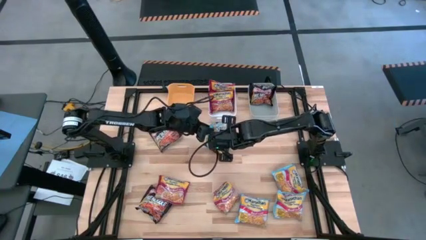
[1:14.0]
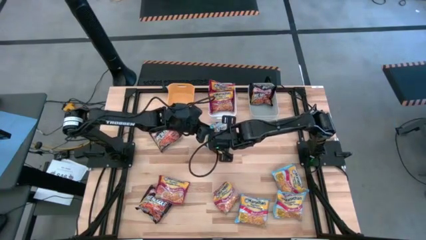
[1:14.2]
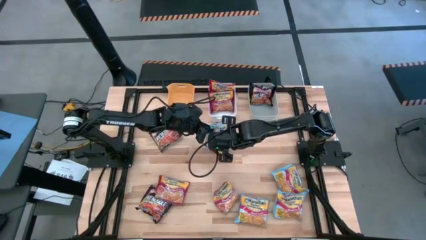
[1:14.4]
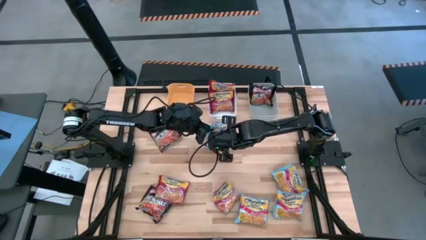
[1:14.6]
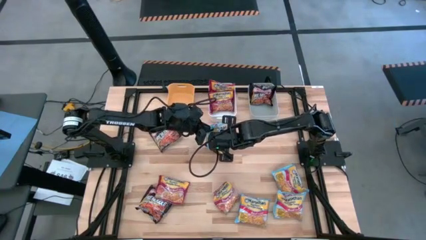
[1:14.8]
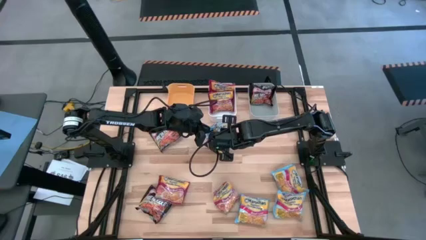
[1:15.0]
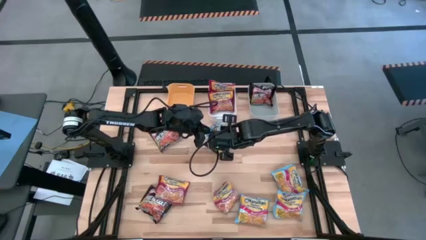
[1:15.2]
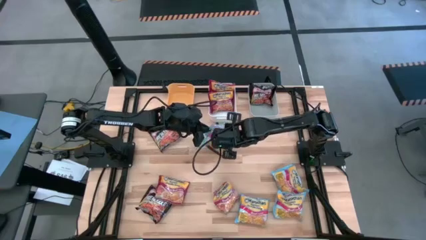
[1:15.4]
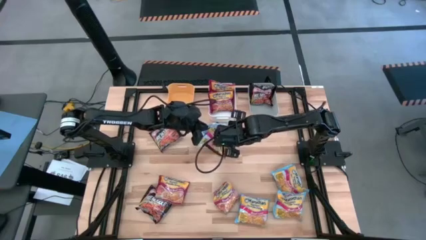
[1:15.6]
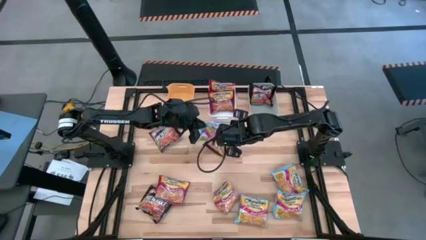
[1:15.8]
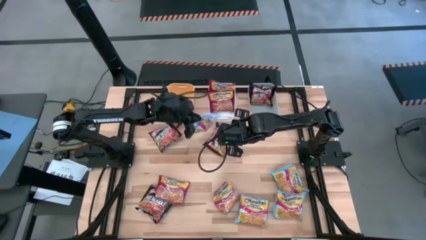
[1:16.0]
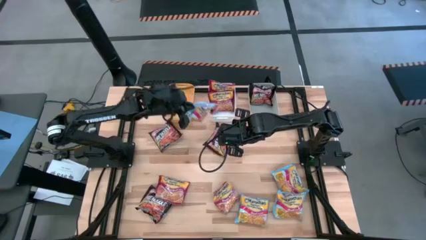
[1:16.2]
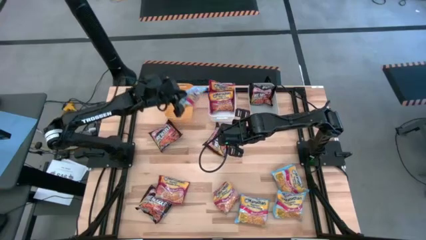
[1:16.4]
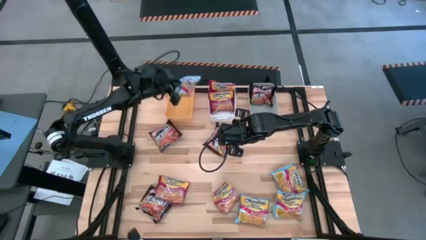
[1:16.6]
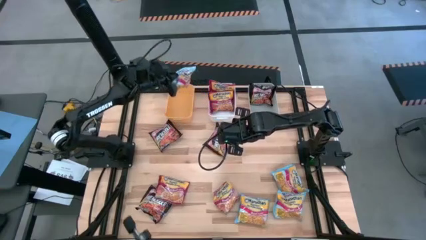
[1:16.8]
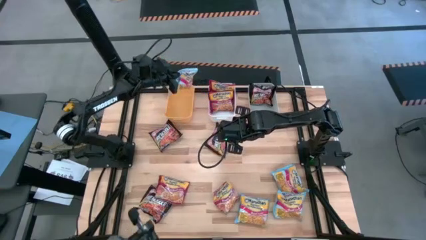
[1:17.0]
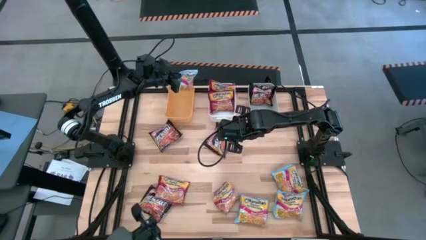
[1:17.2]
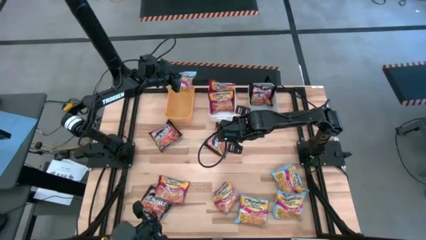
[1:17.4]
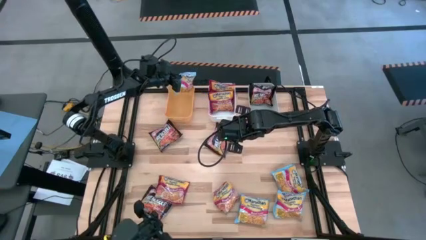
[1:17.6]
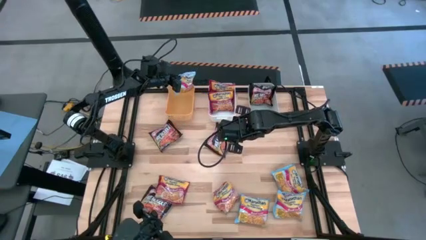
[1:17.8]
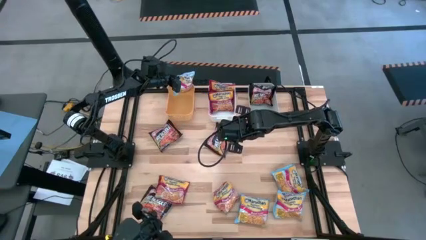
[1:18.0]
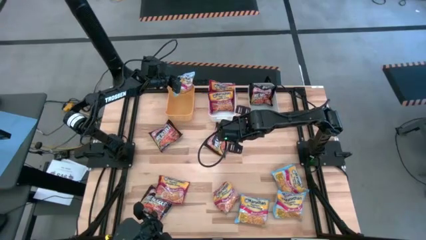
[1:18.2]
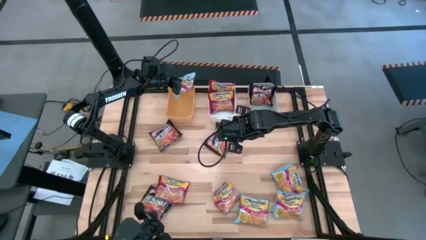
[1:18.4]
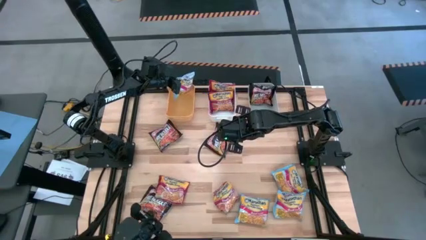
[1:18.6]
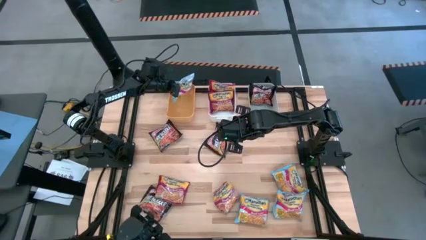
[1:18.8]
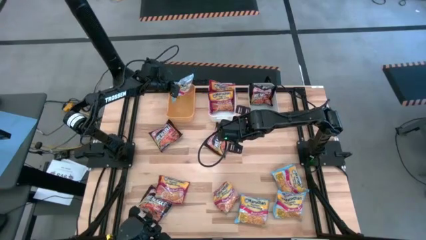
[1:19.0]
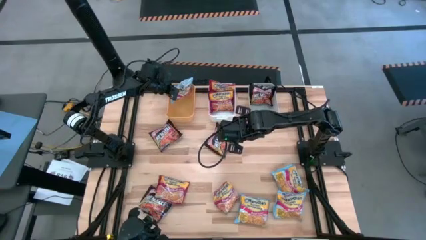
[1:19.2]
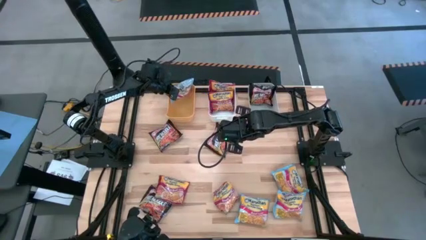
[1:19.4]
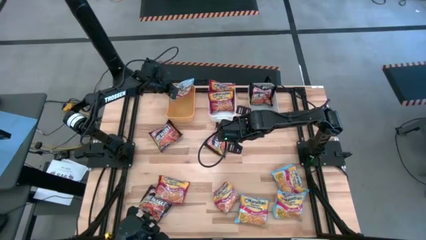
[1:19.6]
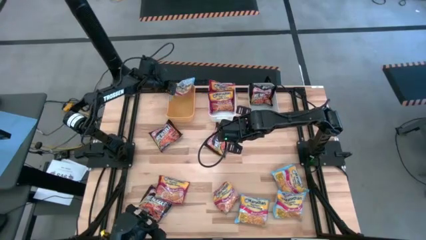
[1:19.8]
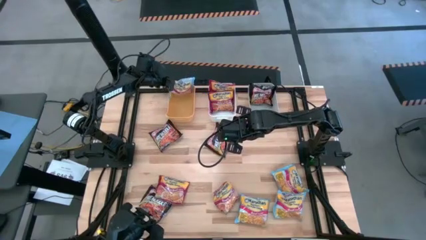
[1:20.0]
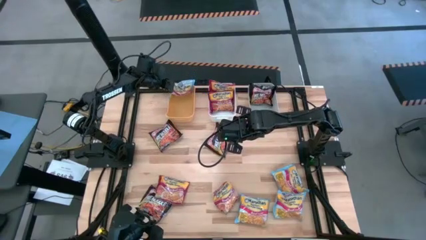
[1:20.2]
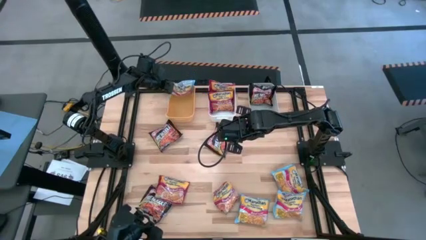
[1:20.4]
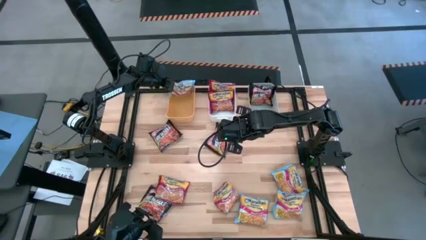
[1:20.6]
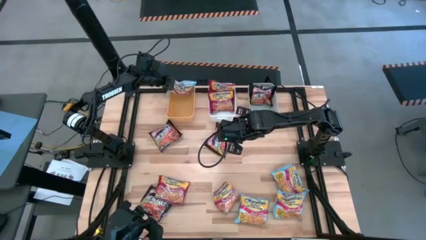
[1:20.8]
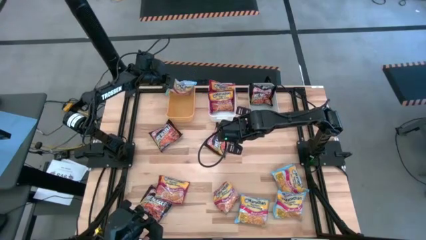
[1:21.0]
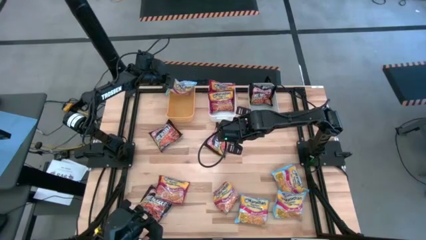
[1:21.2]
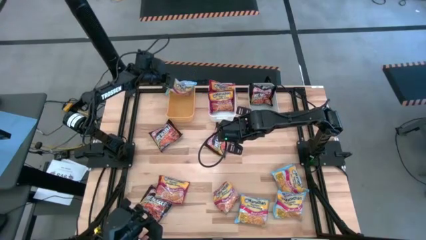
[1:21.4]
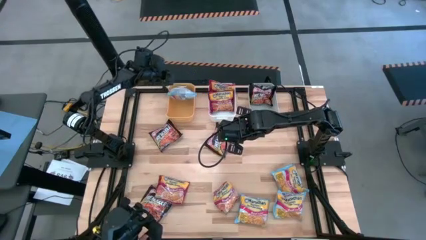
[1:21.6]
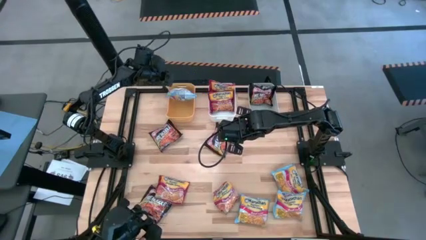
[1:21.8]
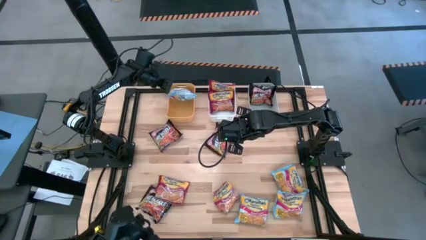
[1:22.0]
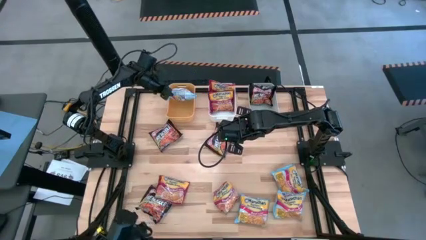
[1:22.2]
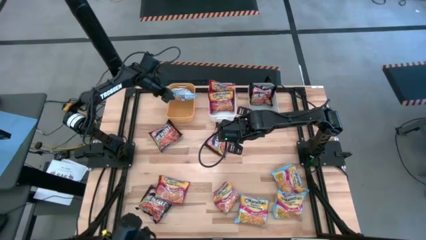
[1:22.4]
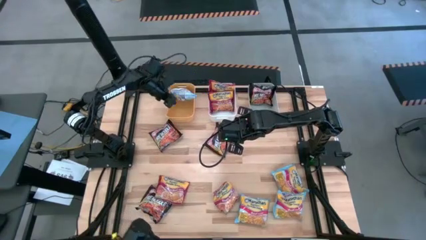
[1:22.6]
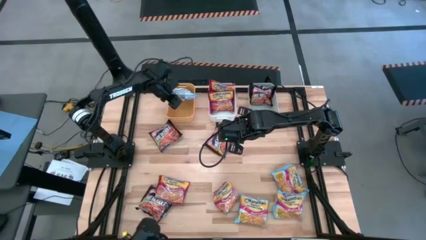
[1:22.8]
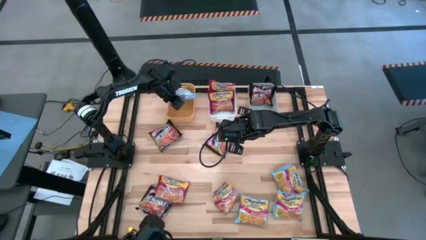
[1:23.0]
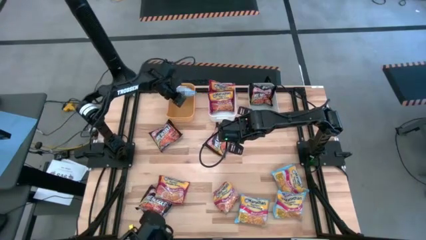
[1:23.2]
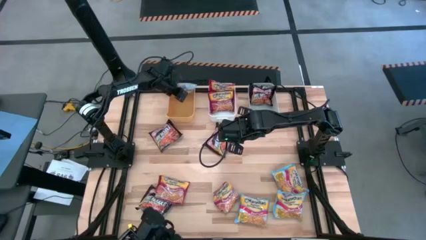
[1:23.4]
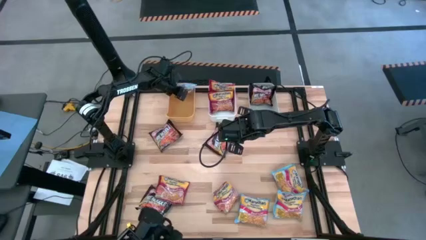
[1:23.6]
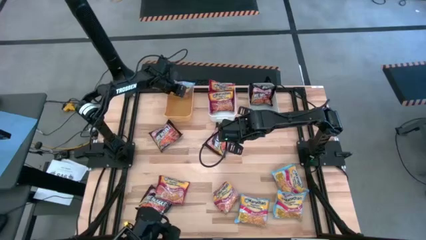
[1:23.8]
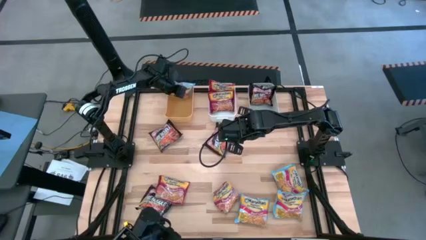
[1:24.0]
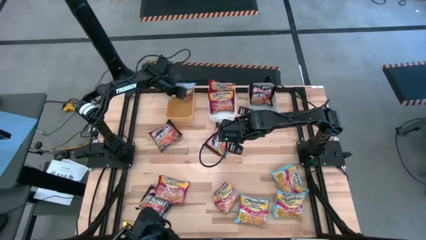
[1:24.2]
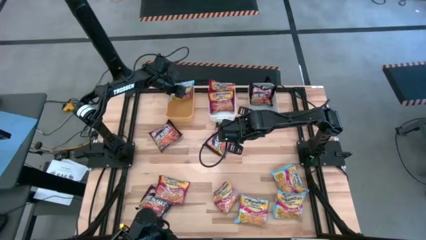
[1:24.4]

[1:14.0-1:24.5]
Task: Sort Maruchan noodles
Put the blue noodle pack into the orange bin

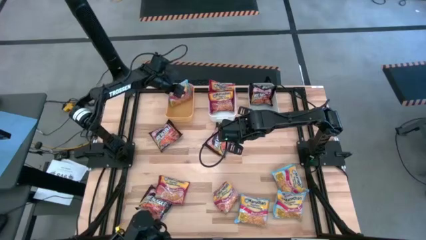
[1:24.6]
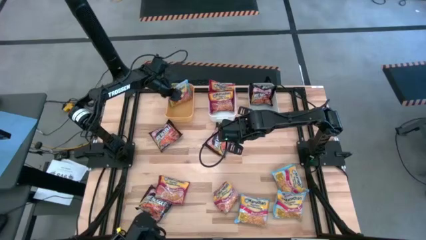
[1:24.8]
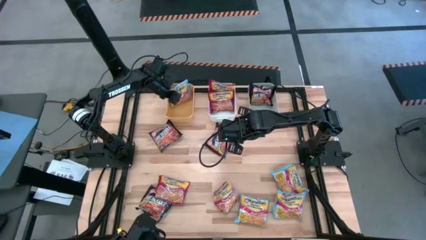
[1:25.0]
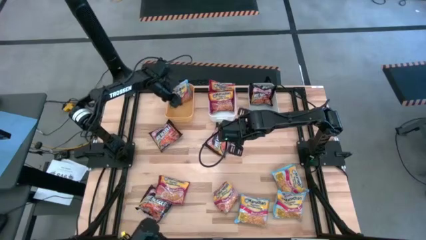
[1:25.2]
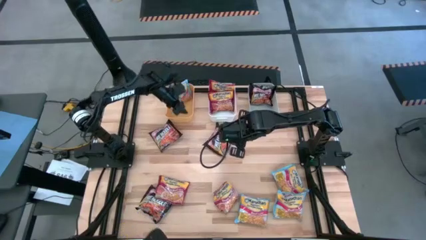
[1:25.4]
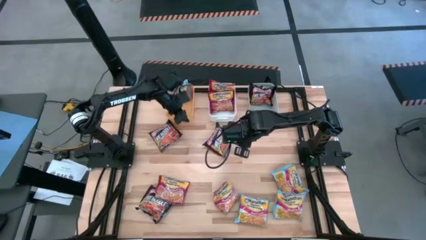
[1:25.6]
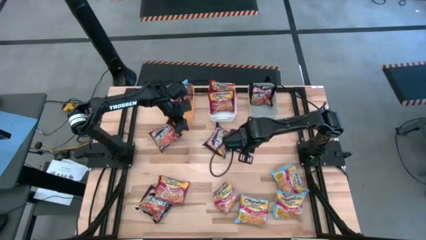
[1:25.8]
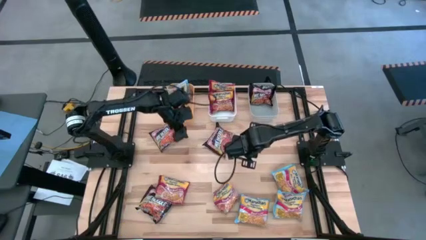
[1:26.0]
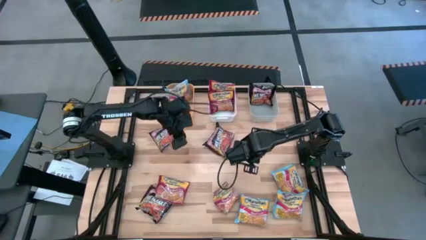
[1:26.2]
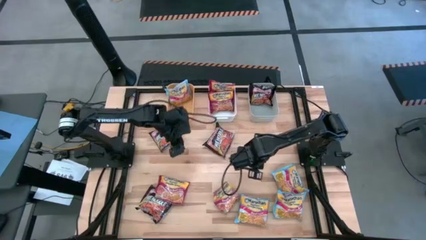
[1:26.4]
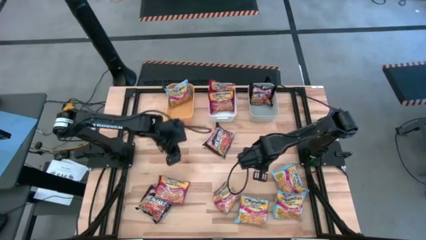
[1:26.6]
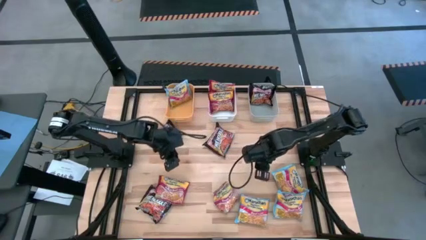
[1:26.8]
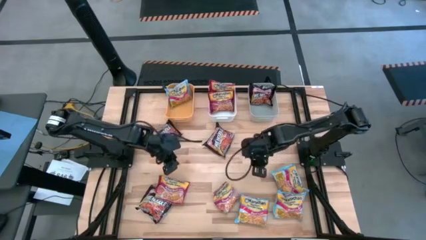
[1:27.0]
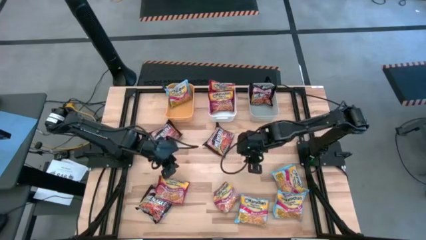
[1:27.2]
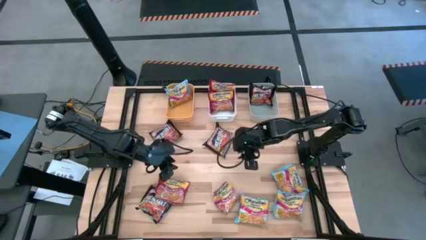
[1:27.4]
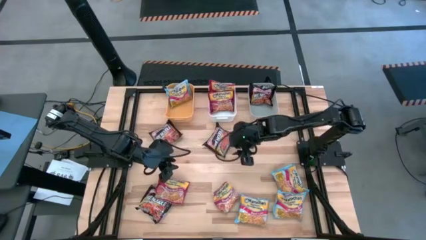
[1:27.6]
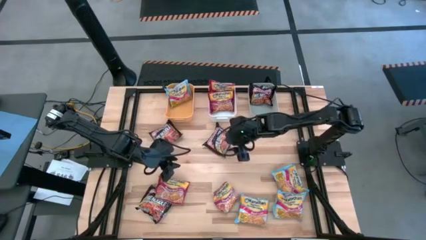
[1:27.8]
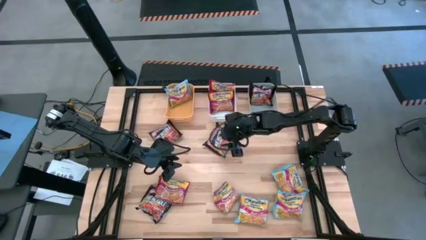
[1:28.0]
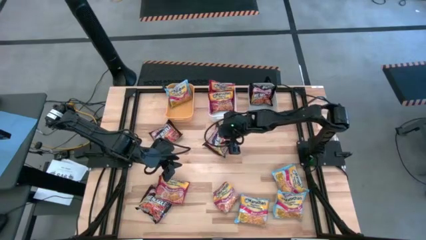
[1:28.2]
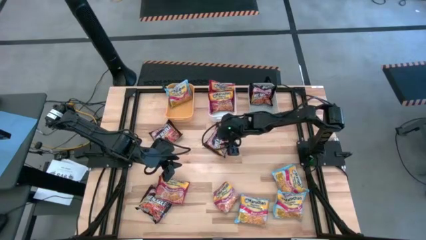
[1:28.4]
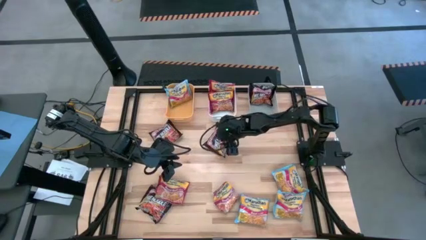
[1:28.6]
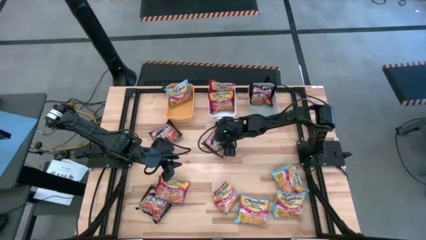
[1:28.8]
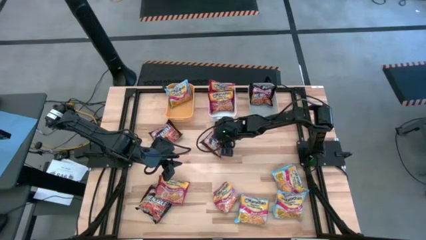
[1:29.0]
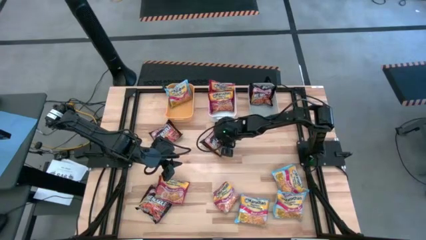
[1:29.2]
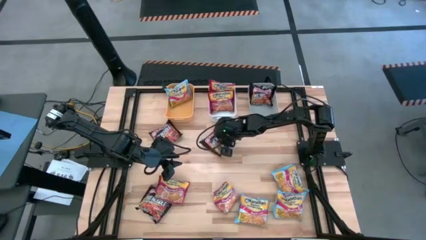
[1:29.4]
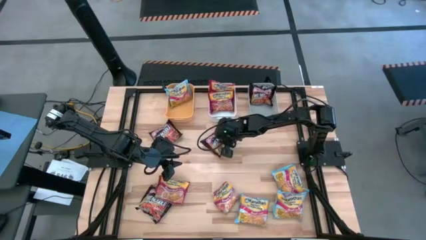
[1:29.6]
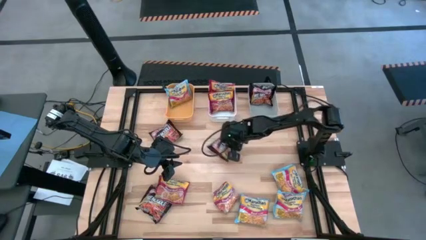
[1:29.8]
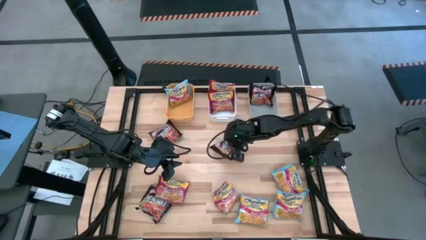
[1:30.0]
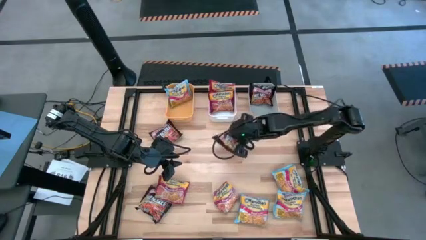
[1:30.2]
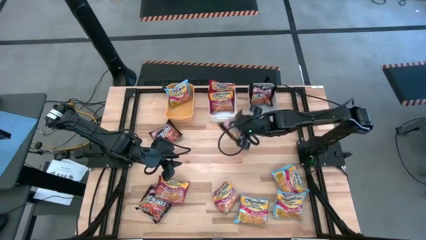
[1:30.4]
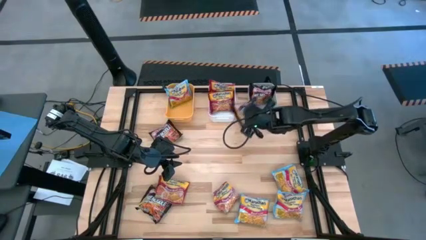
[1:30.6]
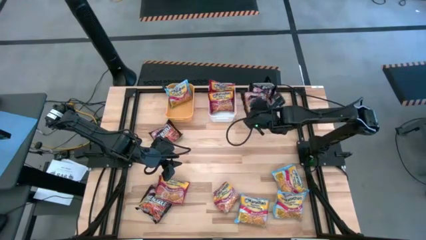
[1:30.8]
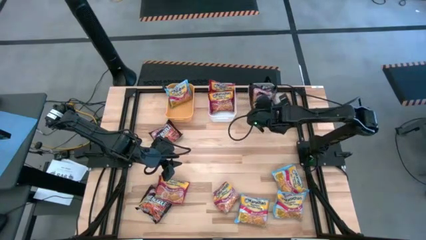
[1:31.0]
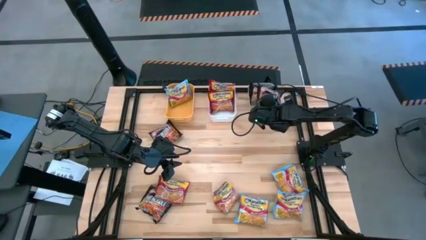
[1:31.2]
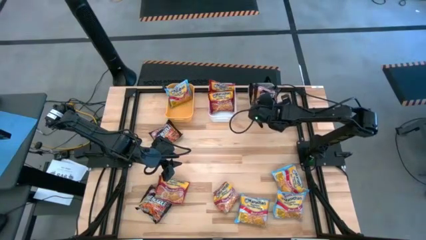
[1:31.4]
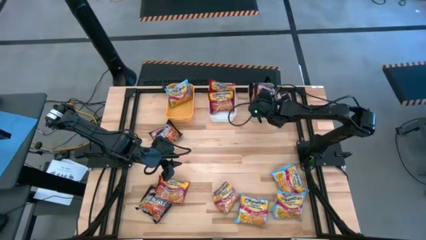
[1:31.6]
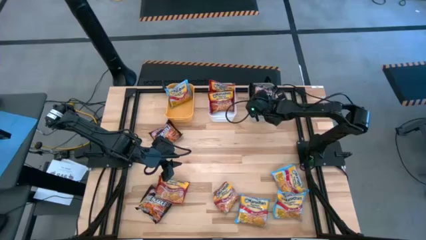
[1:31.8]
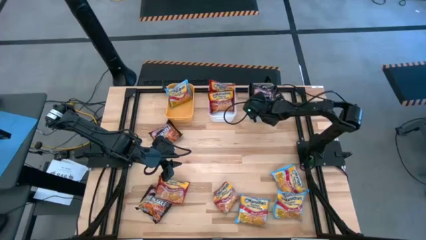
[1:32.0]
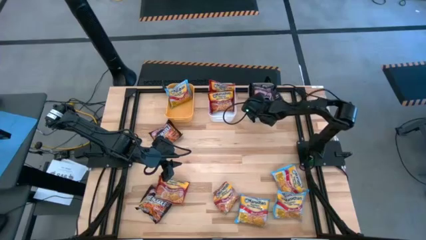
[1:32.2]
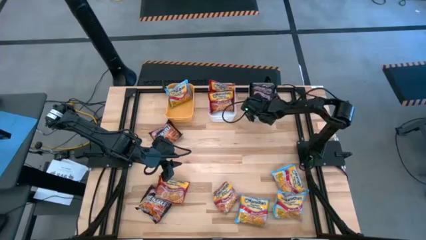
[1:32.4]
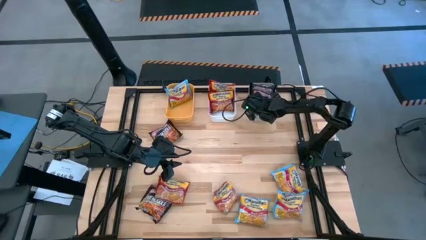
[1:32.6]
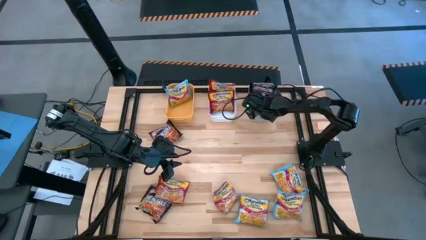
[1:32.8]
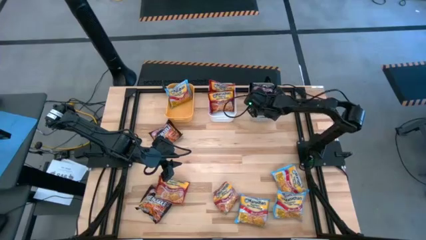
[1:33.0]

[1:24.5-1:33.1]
Put the black noodle pack into the gray bin
